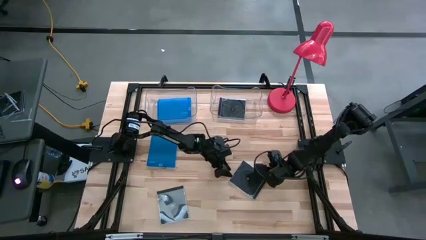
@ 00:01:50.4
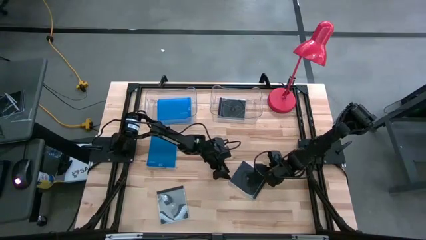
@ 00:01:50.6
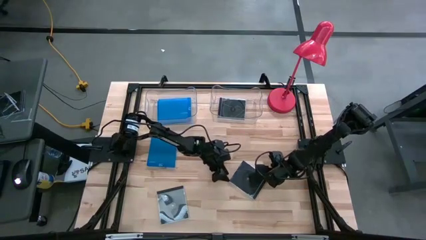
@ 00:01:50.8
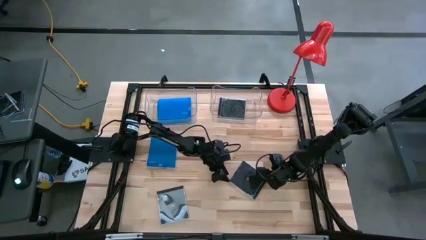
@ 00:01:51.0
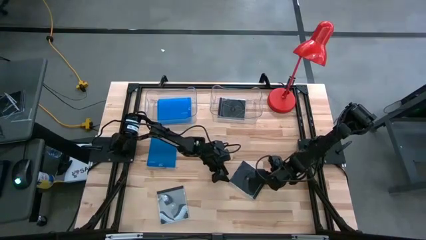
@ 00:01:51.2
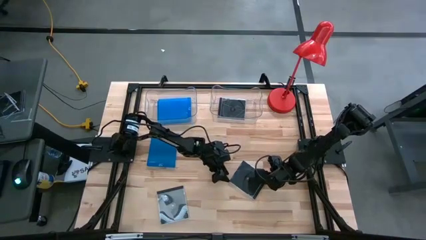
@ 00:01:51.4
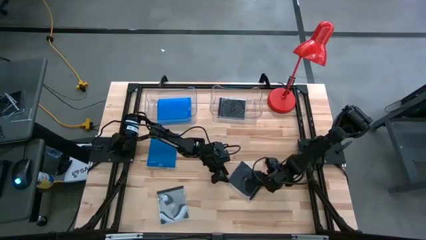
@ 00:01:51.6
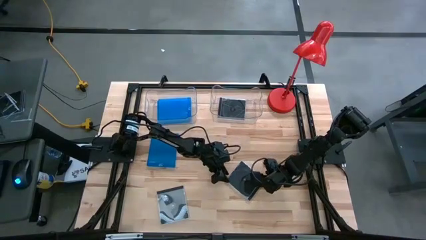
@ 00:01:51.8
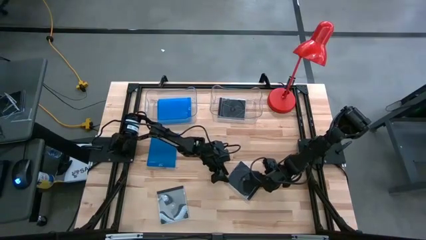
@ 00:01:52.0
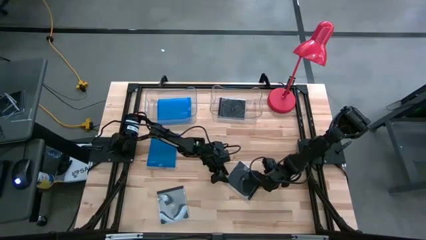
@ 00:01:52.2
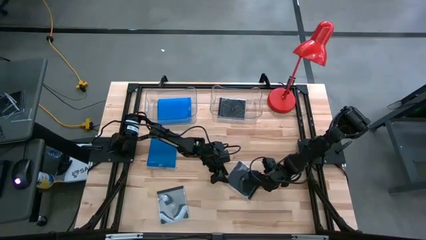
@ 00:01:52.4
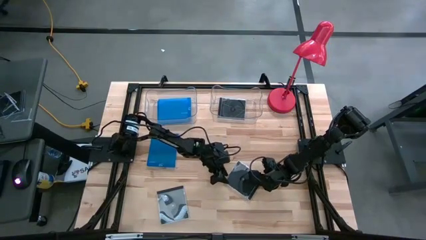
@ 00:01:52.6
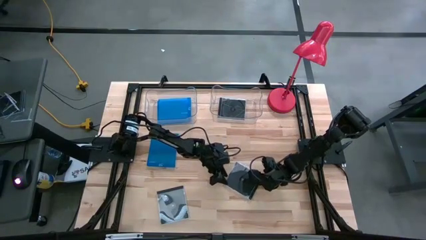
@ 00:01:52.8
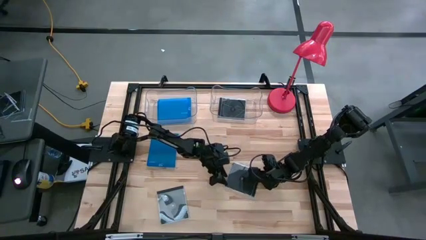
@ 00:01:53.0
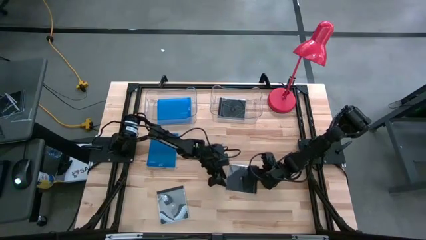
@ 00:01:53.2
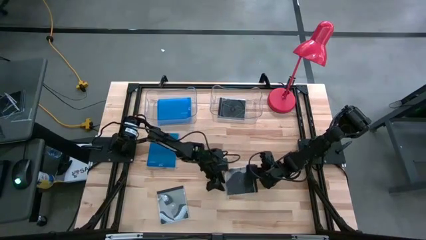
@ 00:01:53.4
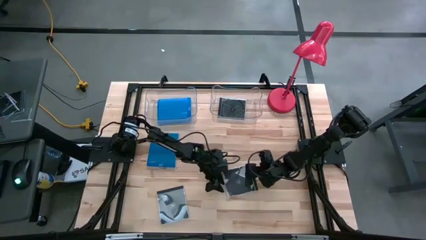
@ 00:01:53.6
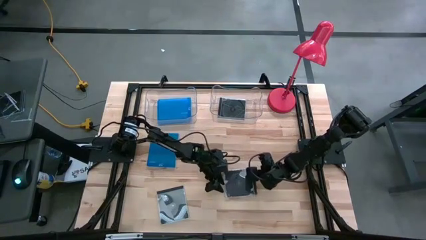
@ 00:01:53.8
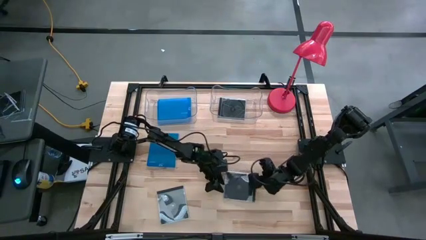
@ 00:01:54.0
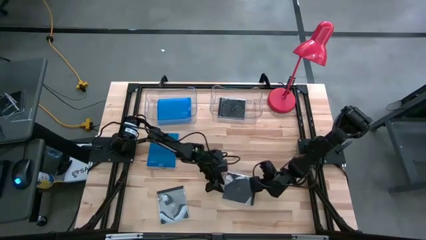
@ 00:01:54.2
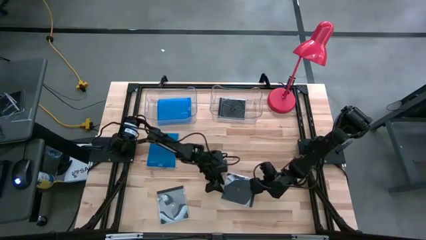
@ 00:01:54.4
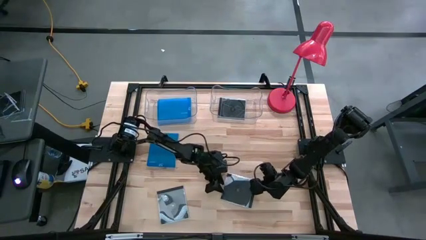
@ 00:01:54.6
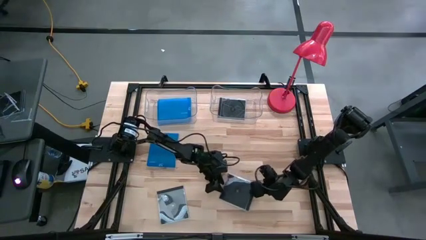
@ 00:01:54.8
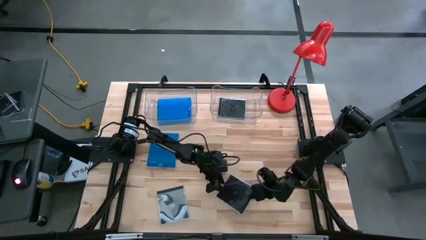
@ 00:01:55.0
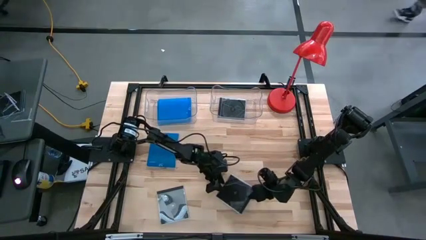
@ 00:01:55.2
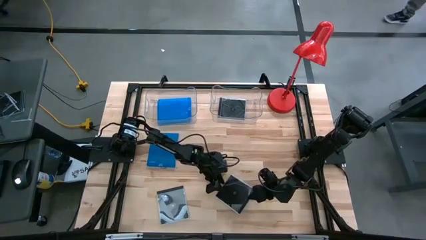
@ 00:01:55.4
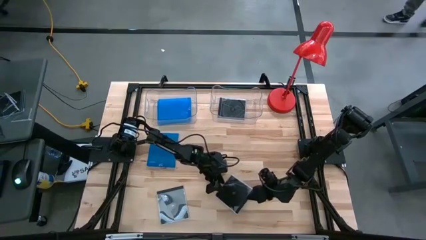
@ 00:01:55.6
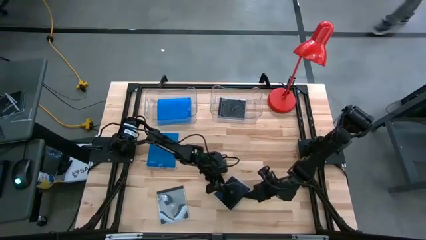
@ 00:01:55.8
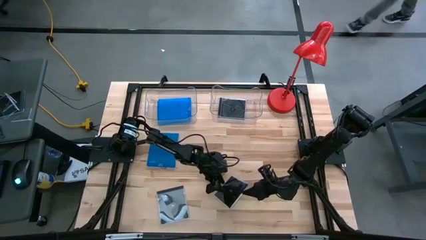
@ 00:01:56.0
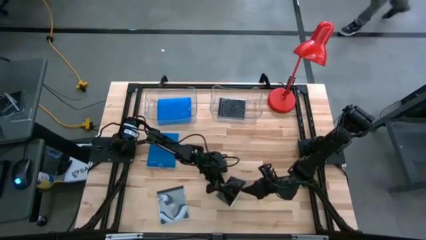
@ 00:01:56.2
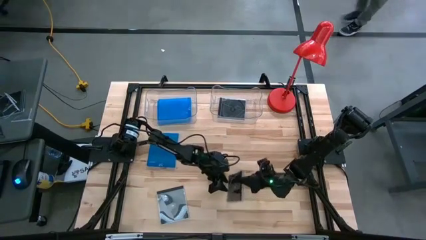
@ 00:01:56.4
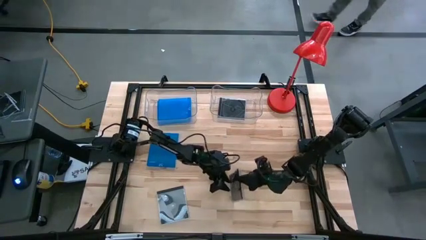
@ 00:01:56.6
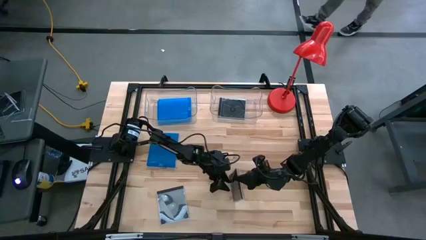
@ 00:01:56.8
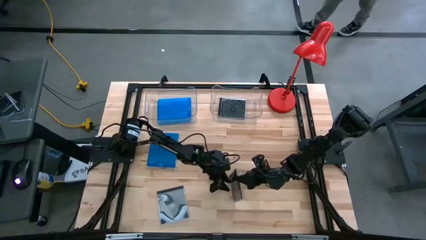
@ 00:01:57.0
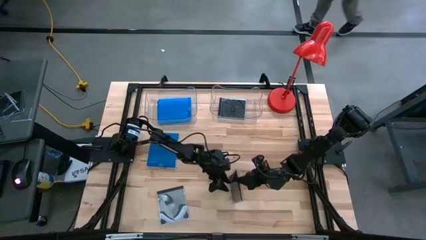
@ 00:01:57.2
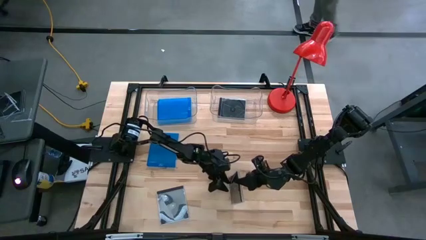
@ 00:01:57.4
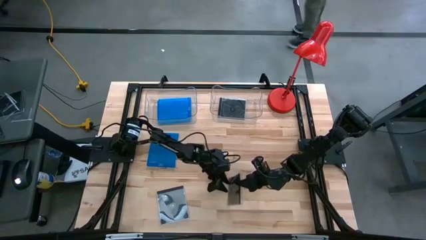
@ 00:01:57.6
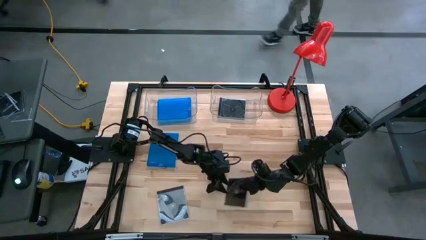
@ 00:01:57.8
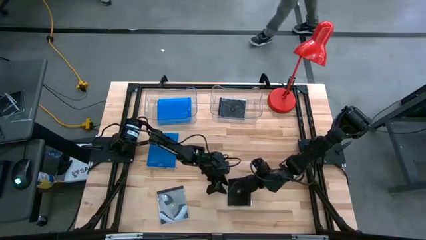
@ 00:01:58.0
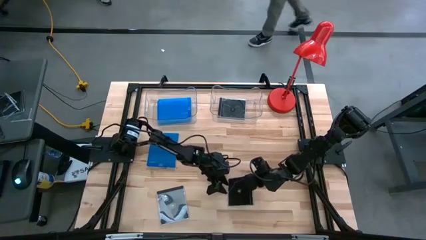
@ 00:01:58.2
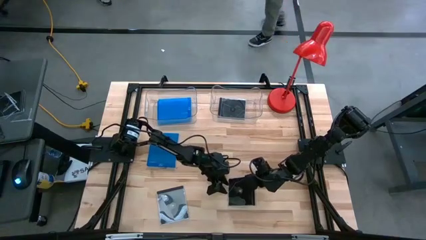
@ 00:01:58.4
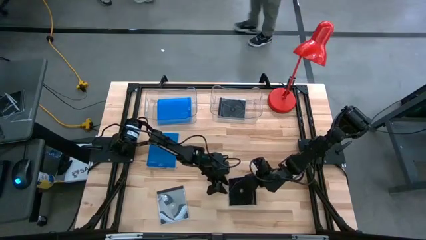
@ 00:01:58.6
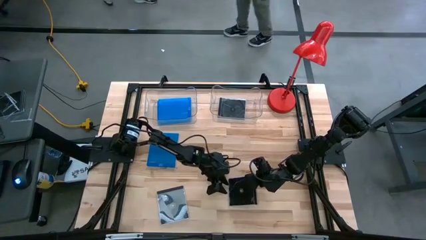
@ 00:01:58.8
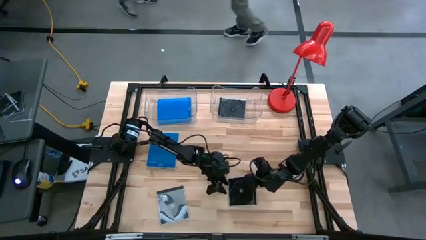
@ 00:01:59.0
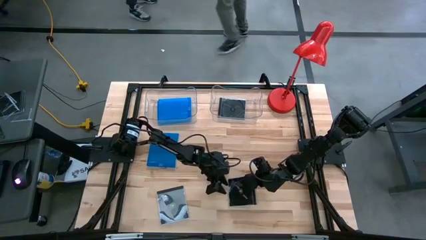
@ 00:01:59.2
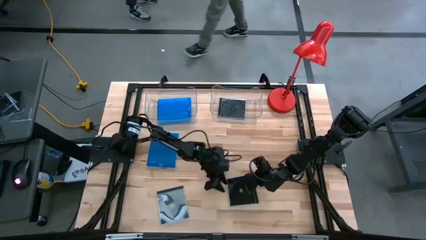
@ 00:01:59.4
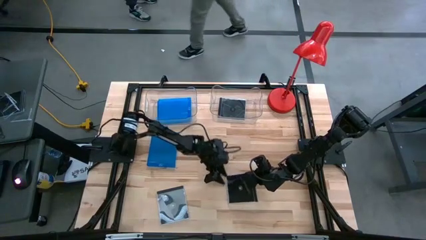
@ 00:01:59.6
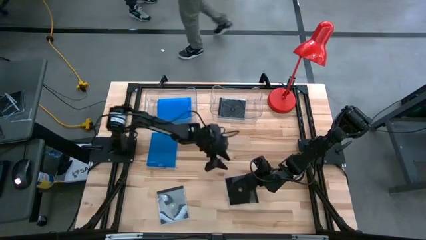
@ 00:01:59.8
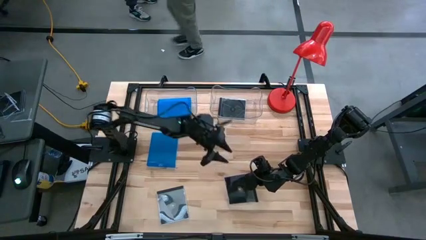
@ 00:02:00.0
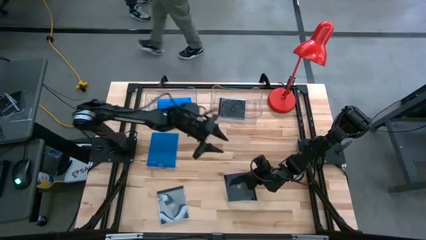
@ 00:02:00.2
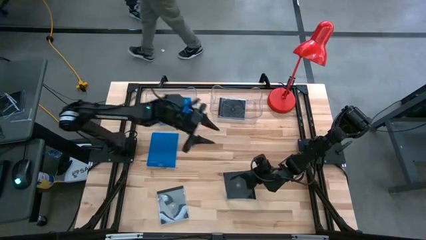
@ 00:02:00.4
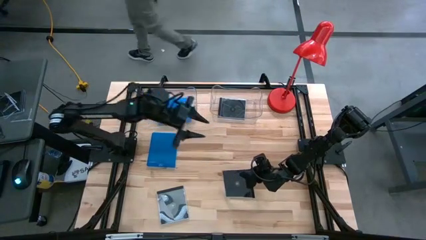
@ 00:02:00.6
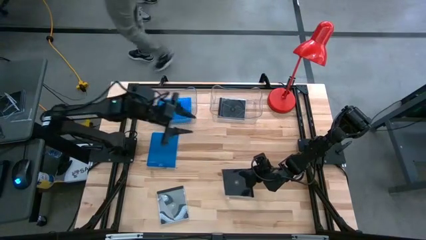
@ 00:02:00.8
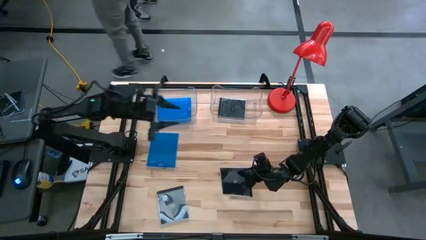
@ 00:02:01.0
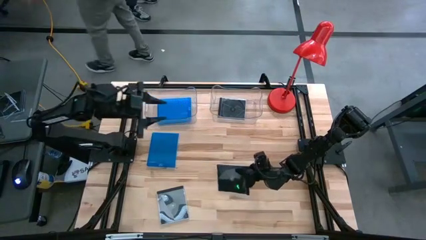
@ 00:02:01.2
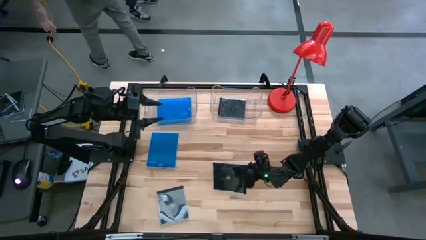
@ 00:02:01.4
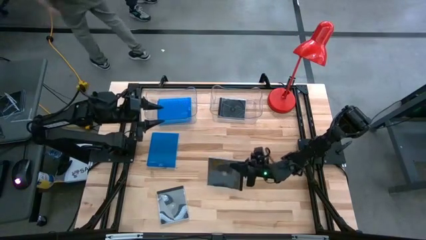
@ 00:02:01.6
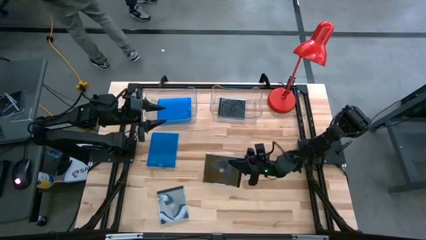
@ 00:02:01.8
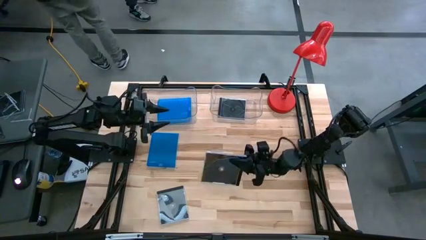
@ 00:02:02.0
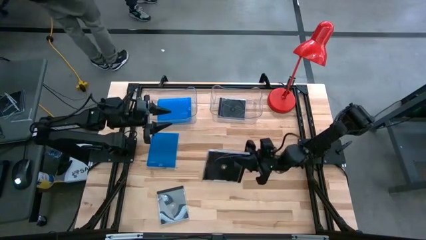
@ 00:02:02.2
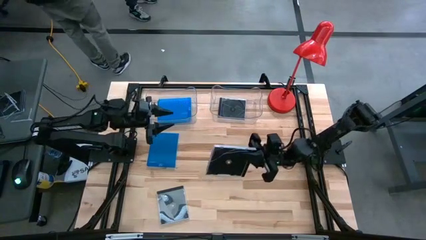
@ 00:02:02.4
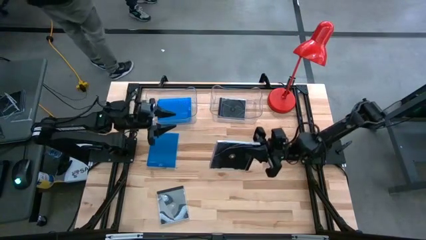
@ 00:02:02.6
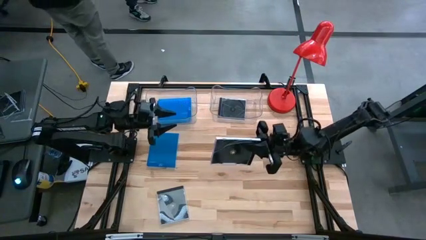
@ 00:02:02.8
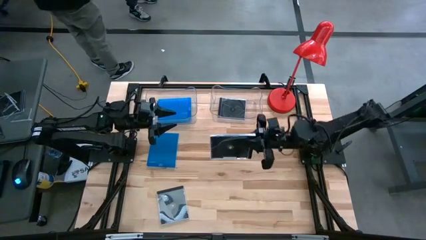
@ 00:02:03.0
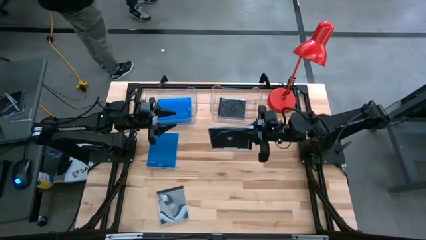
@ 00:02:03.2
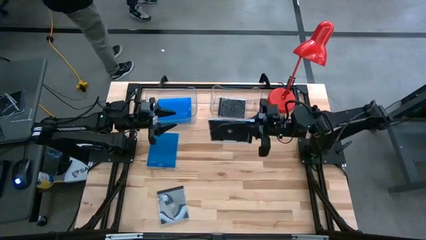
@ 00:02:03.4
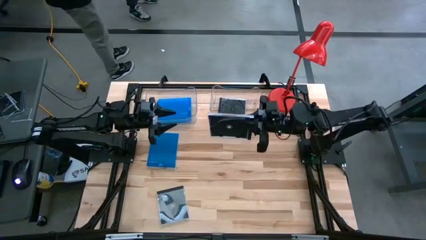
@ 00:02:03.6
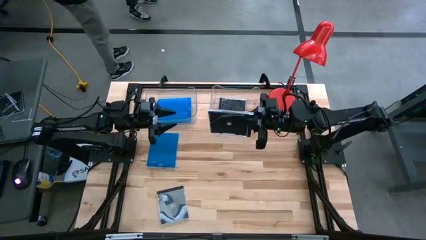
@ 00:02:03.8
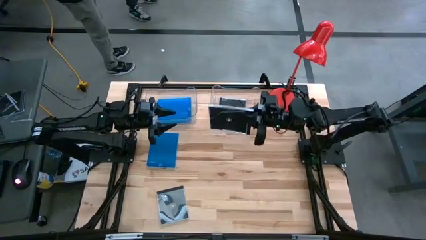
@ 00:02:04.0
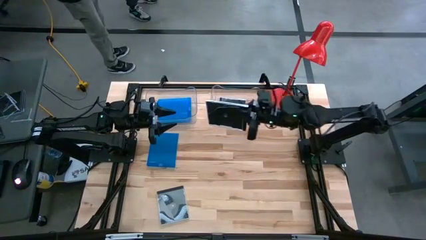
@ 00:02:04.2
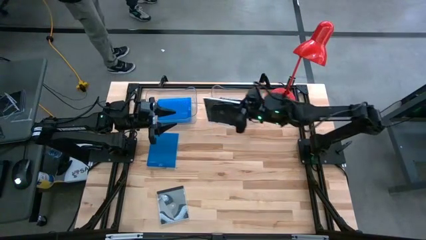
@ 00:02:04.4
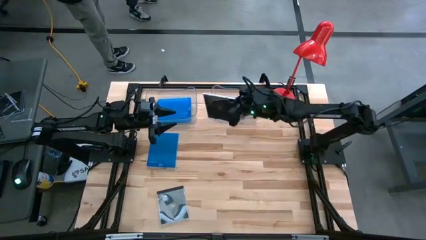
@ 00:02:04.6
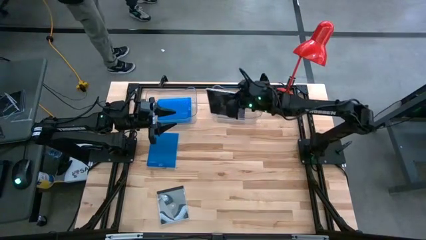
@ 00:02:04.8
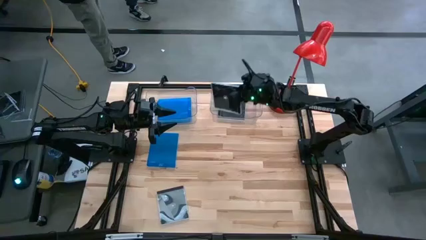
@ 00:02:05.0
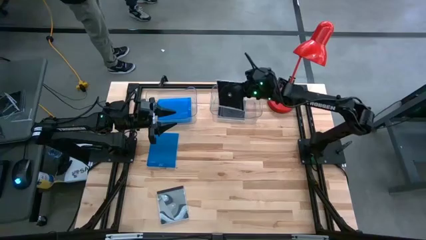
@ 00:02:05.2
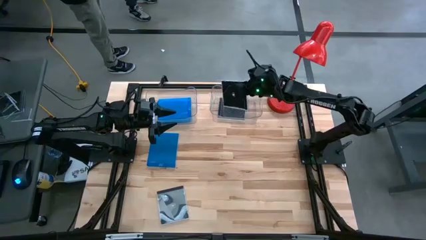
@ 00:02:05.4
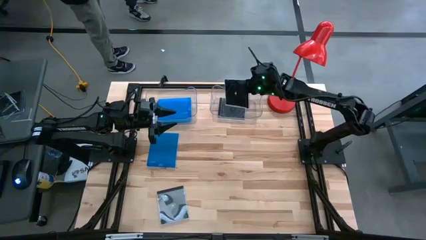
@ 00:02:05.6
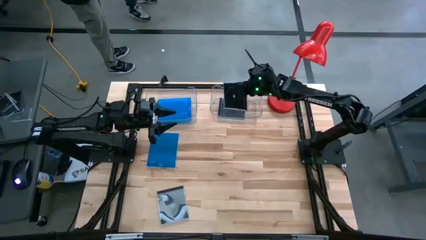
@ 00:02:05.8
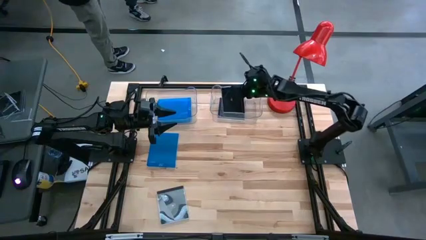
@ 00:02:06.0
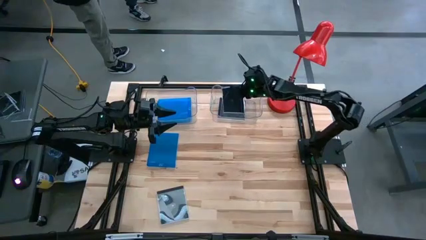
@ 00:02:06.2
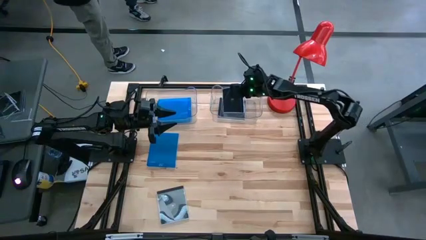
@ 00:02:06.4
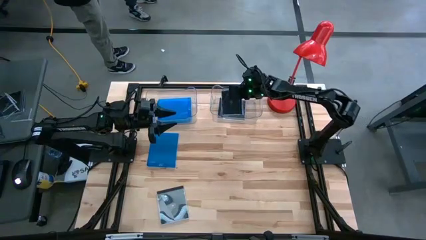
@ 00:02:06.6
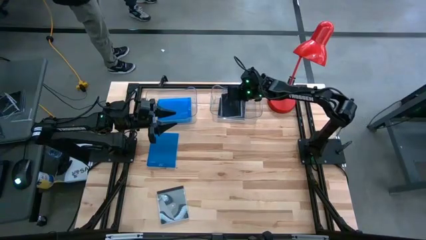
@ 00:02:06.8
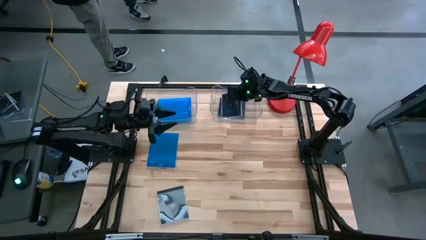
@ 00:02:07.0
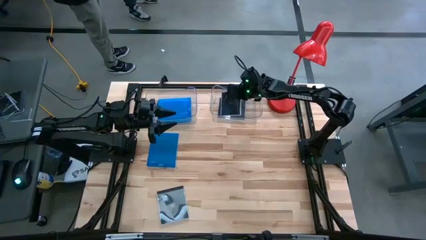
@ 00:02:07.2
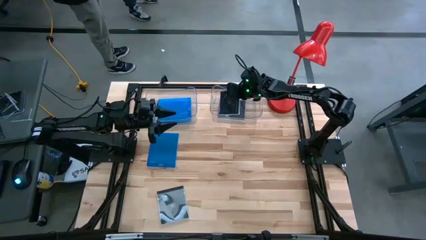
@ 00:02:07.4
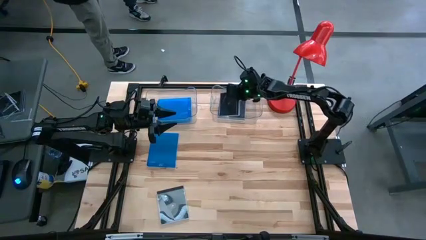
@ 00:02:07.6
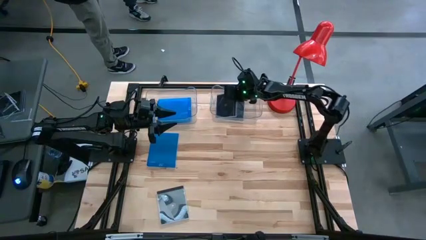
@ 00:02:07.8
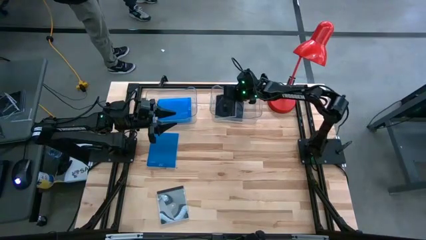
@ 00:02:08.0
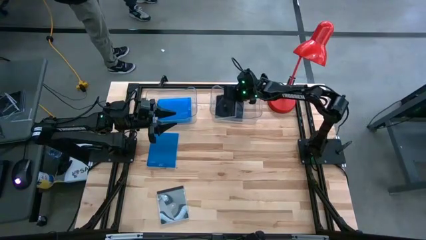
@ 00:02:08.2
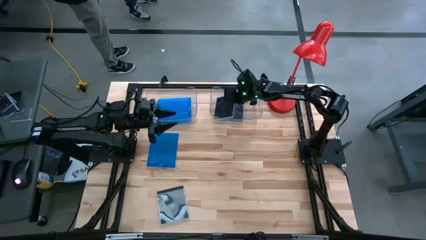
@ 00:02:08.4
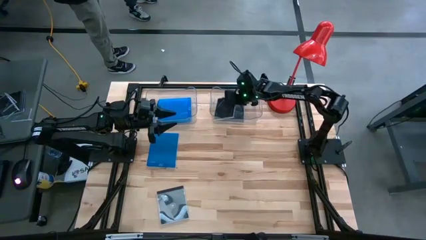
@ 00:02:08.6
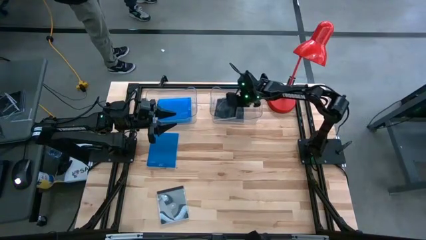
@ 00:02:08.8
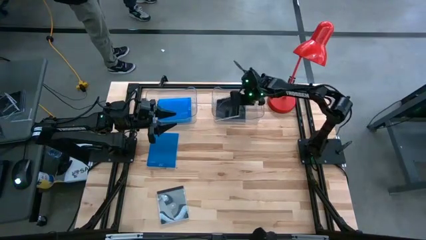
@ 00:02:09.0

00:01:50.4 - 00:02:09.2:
Task: Pick & place jewel cases by type
Put the right black CD case into the right transparent bin
